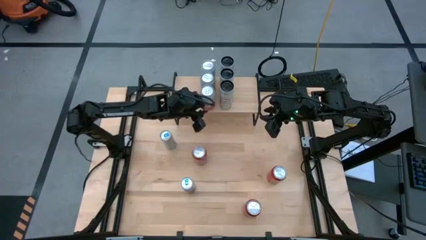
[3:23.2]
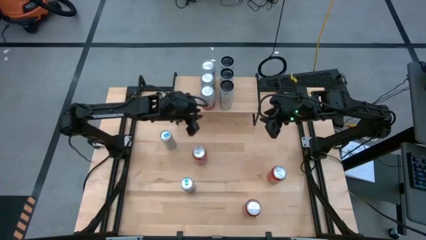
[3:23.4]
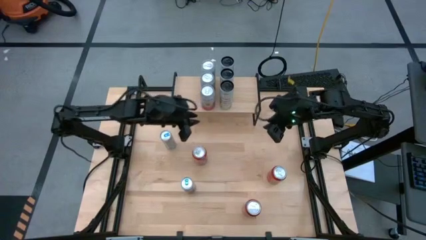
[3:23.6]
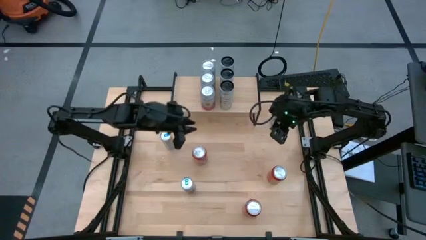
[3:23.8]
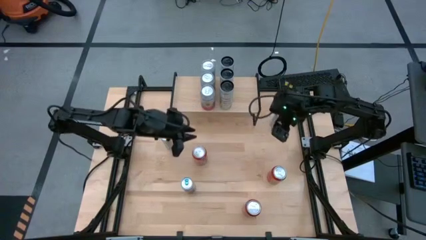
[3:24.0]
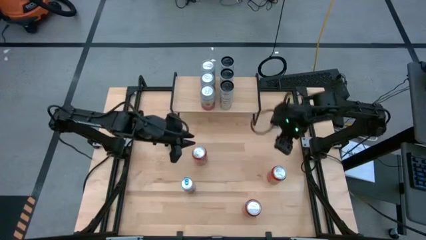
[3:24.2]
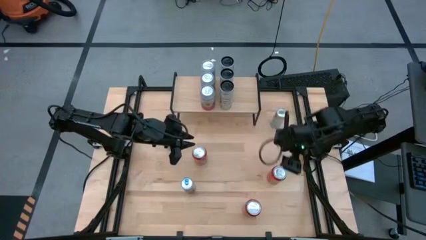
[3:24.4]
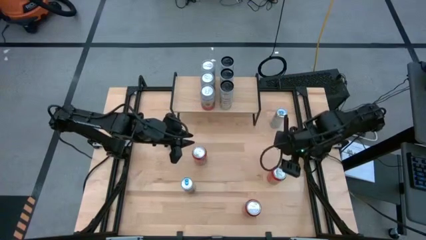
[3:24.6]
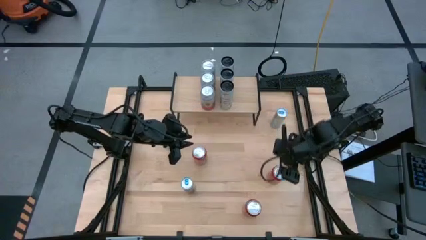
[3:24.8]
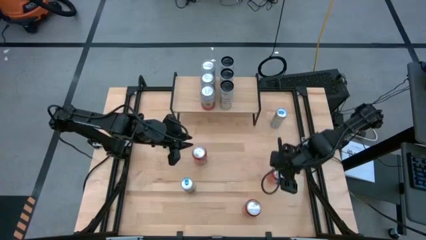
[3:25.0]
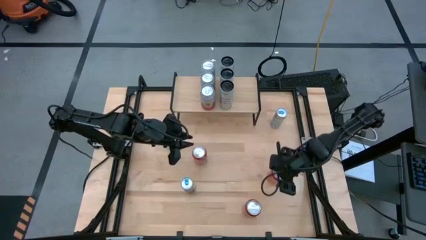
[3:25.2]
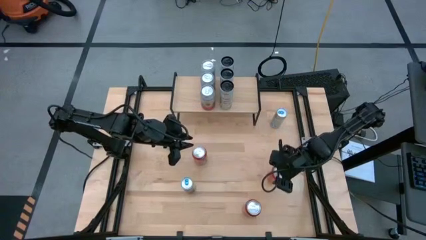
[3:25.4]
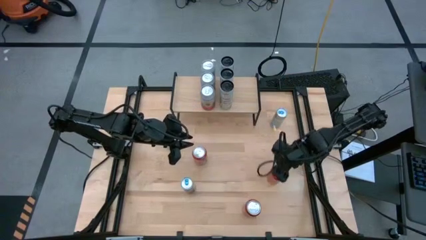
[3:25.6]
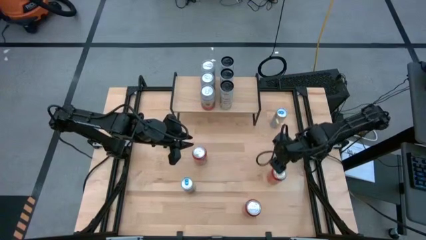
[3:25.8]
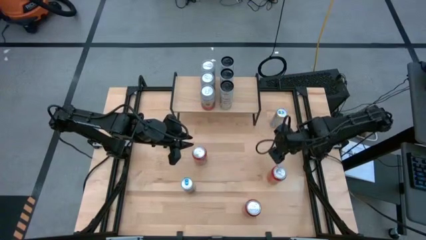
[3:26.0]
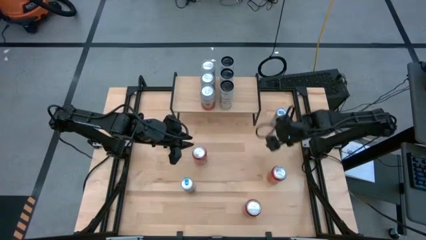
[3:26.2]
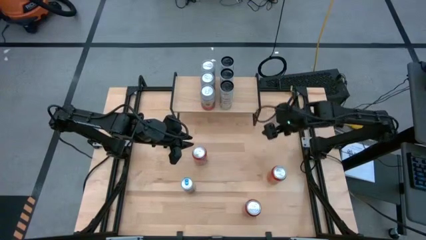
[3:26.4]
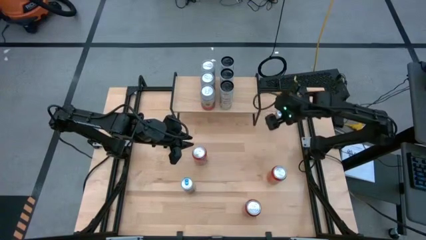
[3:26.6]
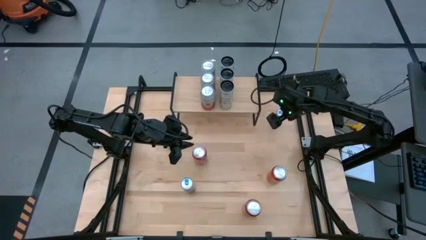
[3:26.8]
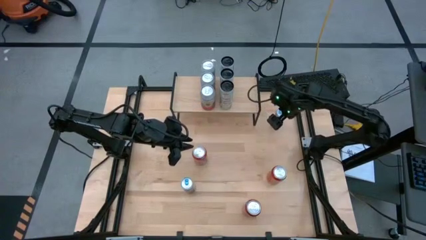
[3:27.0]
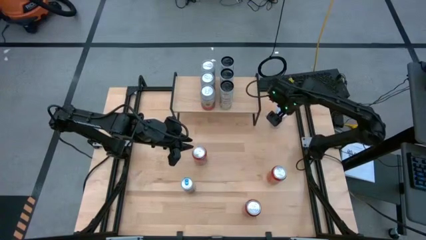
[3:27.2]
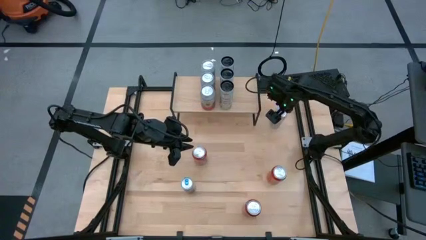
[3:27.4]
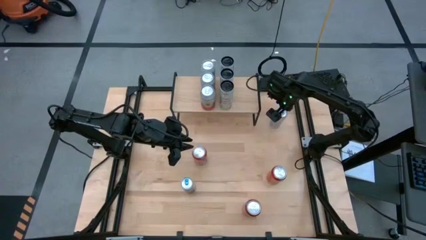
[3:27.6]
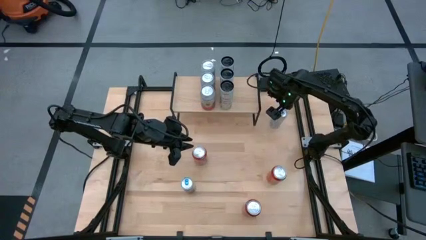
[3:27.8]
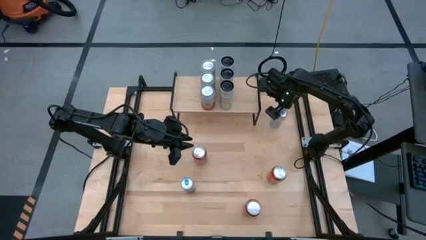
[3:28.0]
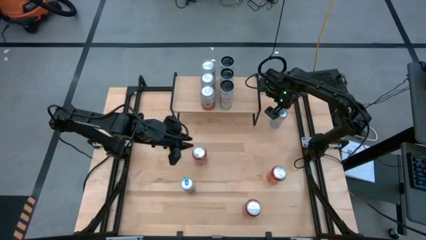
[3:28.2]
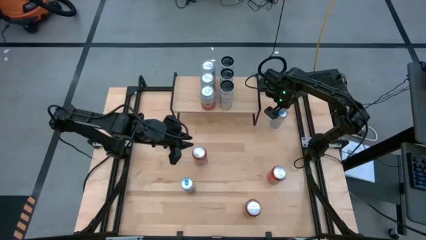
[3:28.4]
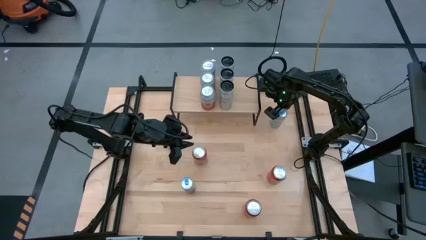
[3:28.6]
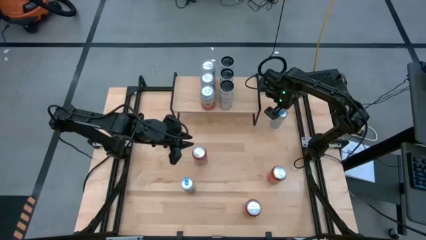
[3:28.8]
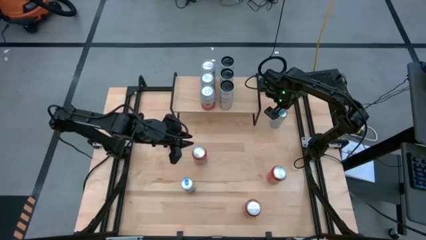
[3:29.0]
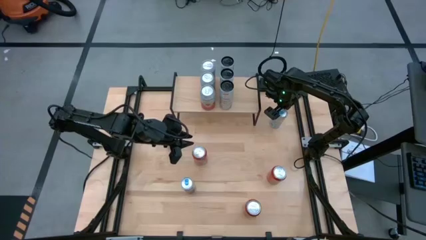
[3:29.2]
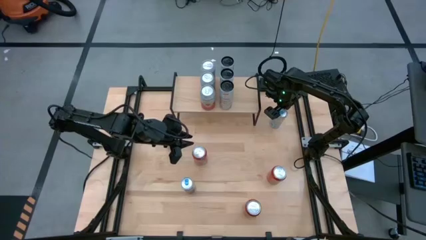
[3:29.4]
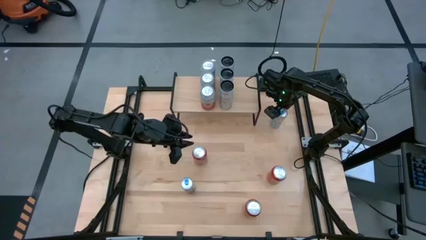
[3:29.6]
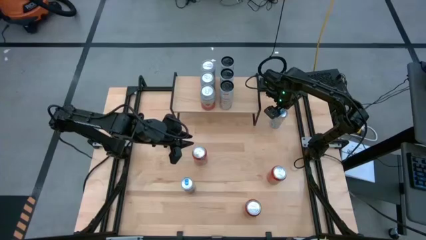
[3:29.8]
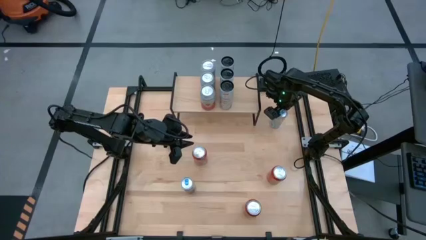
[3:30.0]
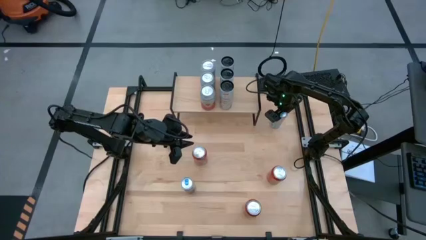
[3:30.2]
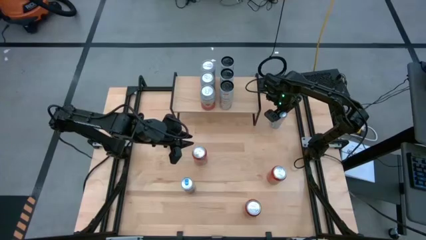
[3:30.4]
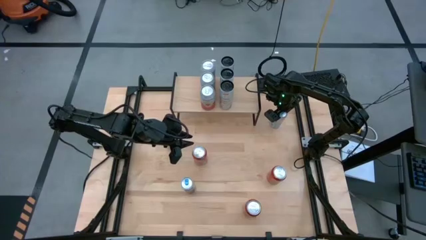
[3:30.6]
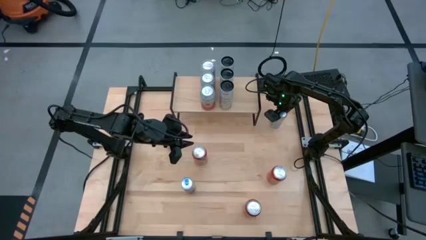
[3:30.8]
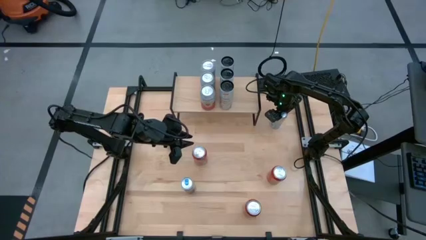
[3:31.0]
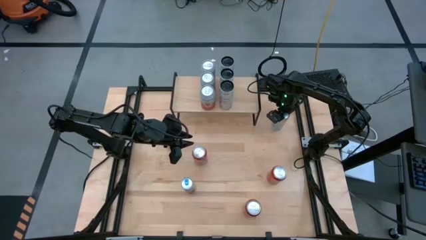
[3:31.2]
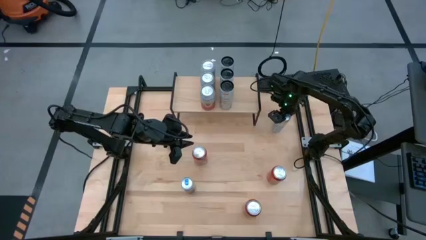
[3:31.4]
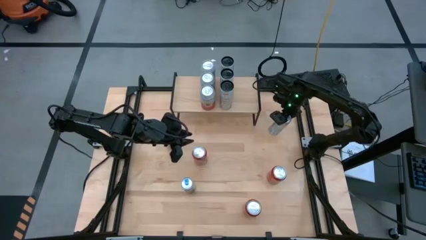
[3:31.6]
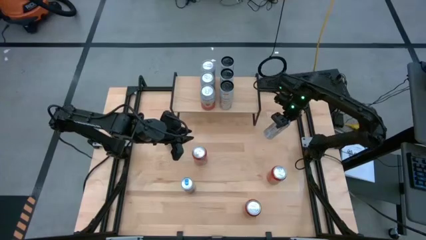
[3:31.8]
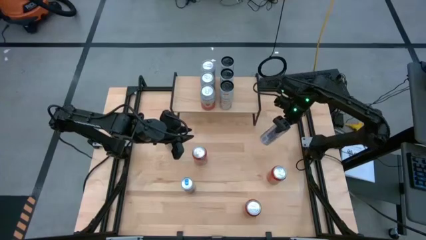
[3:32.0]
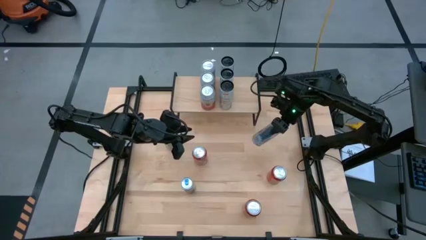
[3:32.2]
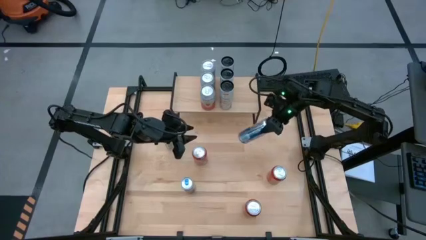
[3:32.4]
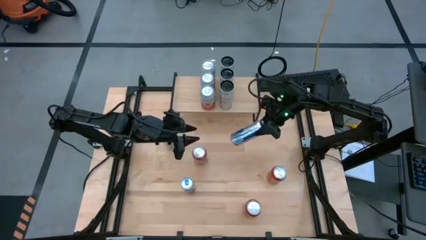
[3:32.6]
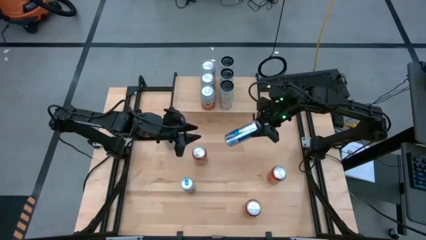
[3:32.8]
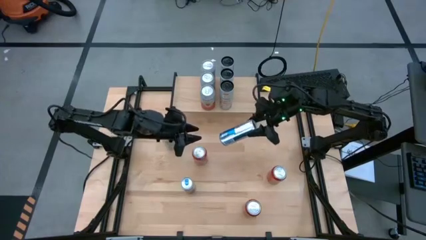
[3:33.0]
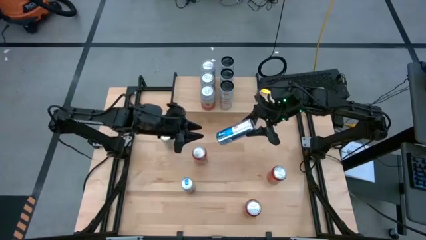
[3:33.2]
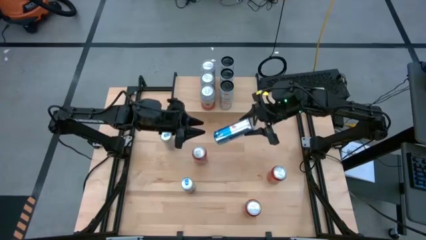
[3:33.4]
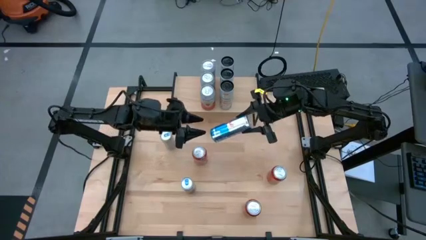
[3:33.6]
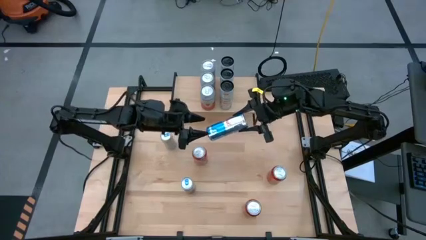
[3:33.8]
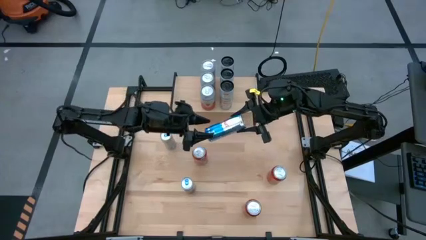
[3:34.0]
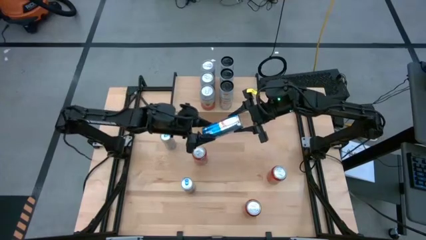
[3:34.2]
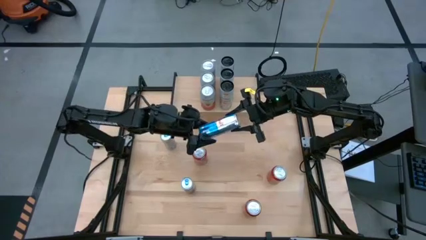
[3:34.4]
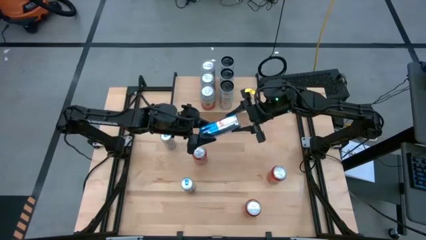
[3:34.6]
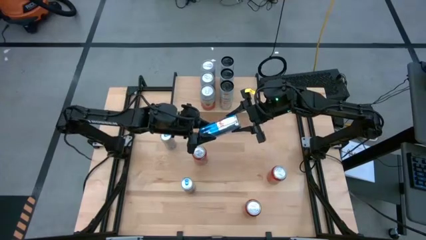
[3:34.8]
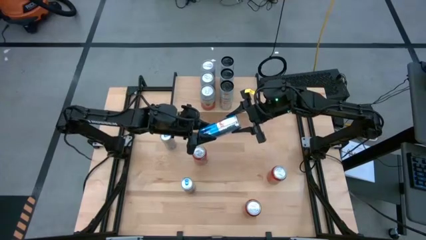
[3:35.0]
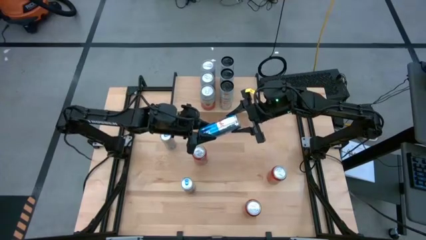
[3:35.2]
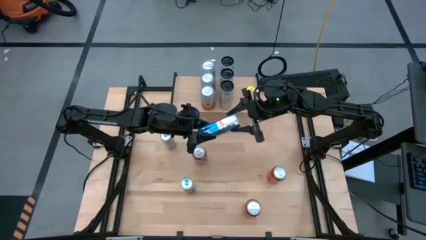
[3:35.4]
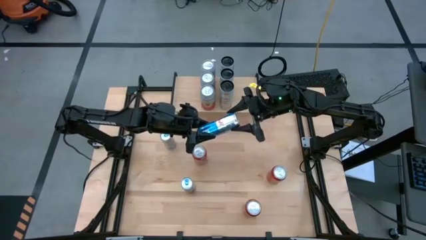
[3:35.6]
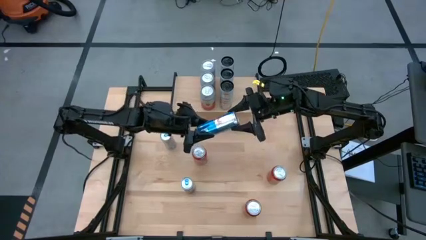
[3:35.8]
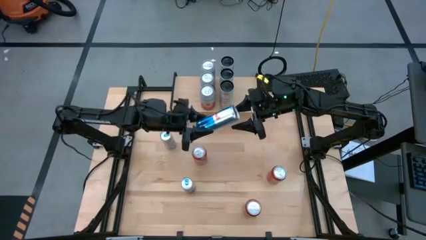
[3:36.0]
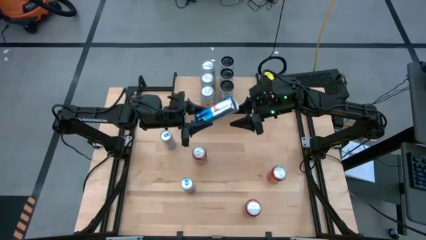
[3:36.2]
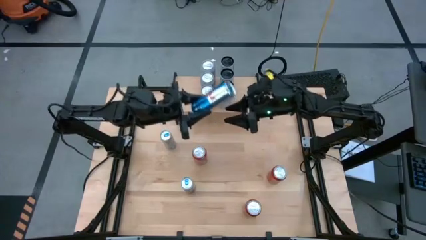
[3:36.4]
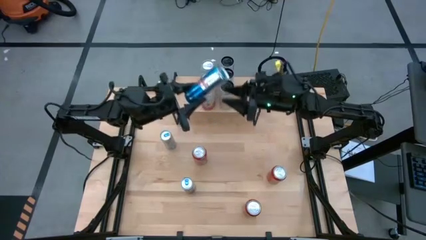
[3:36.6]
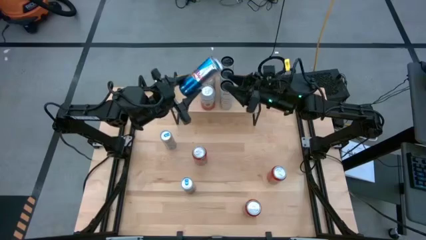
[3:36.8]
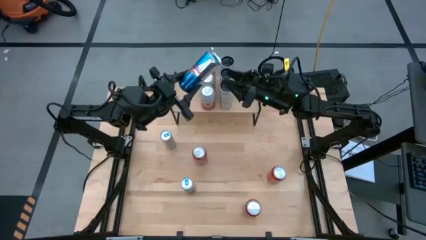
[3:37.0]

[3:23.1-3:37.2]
Task: Place canned beverage on shelf
Put the top right blue soda can on the shelf
